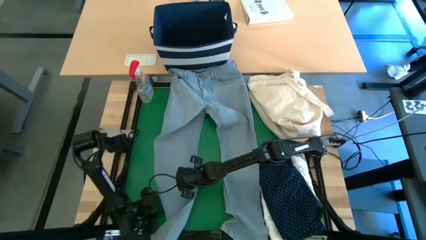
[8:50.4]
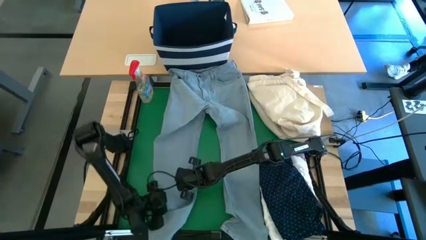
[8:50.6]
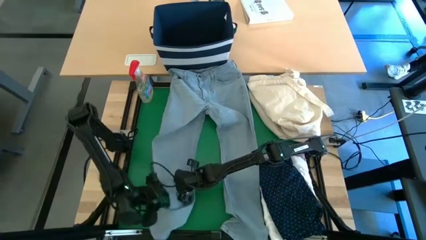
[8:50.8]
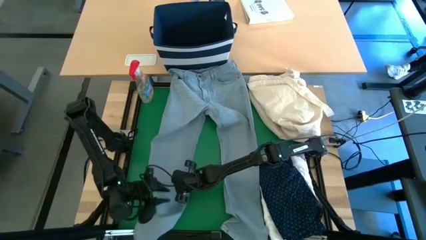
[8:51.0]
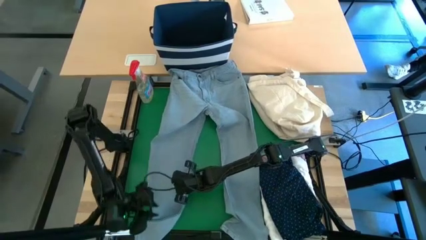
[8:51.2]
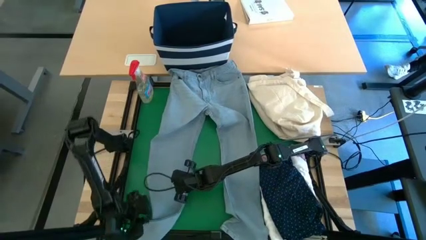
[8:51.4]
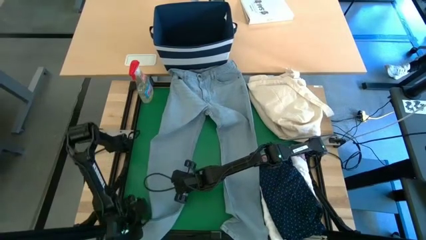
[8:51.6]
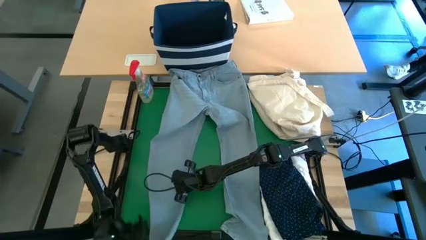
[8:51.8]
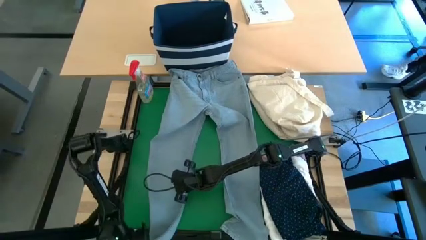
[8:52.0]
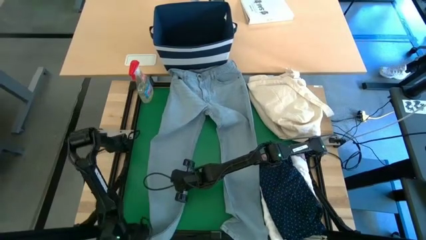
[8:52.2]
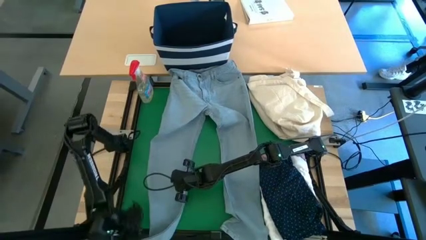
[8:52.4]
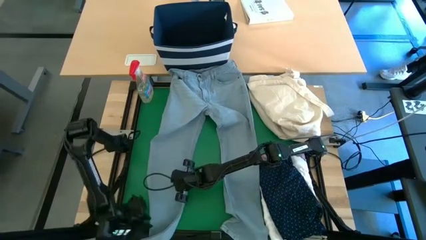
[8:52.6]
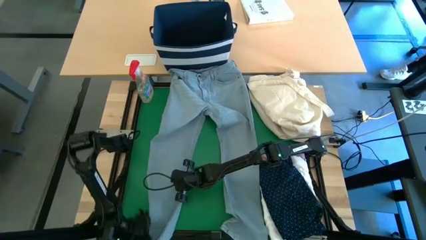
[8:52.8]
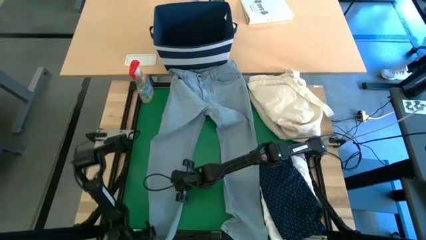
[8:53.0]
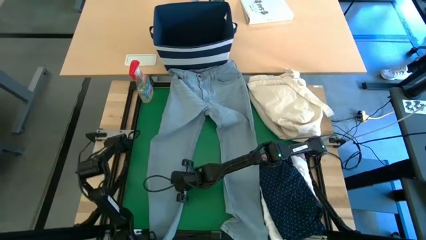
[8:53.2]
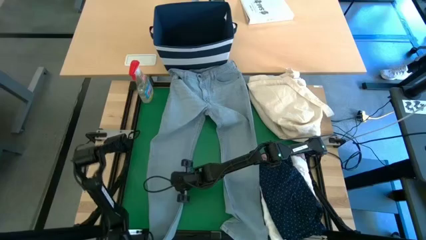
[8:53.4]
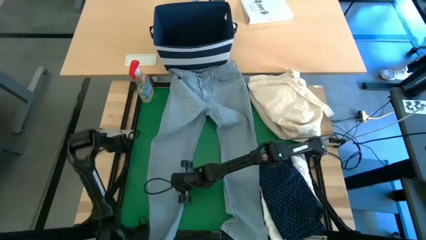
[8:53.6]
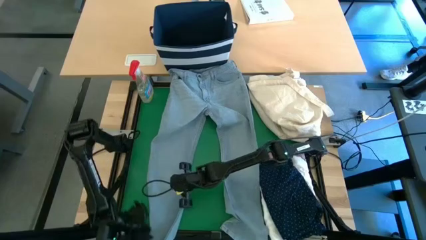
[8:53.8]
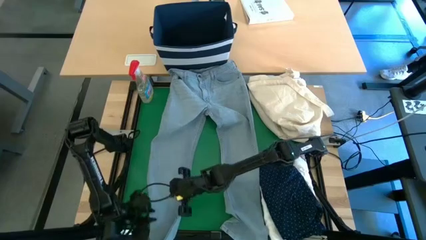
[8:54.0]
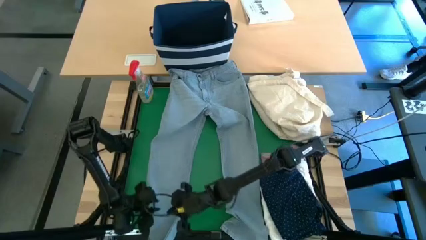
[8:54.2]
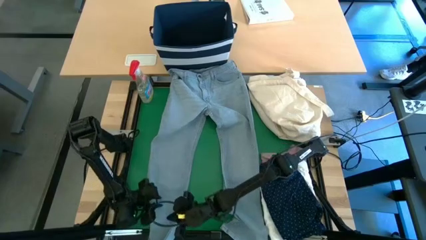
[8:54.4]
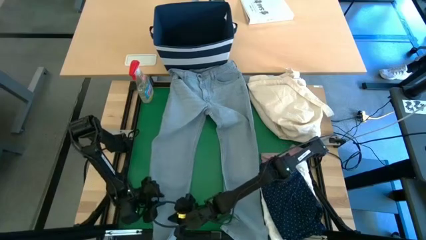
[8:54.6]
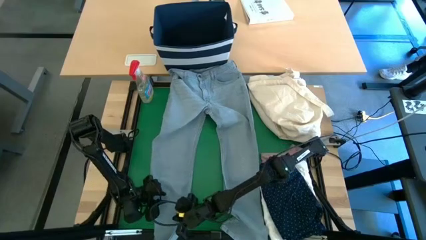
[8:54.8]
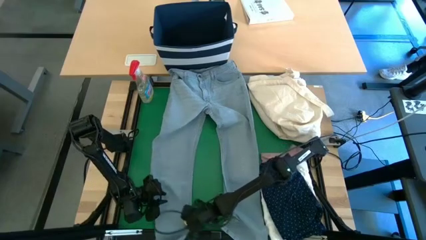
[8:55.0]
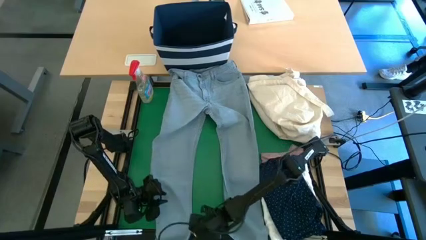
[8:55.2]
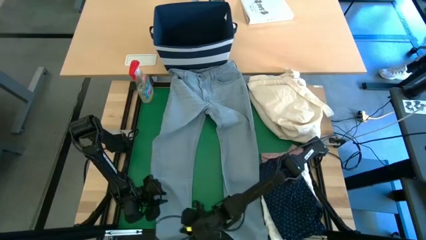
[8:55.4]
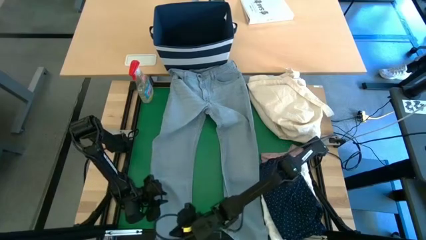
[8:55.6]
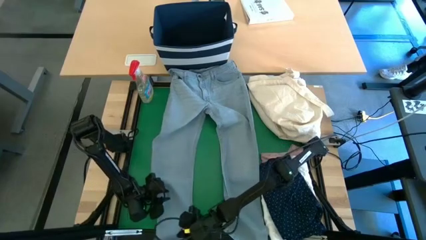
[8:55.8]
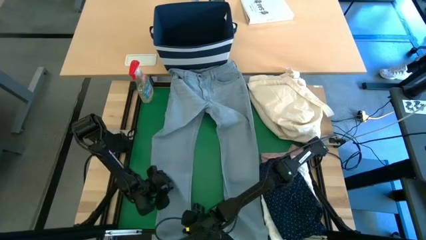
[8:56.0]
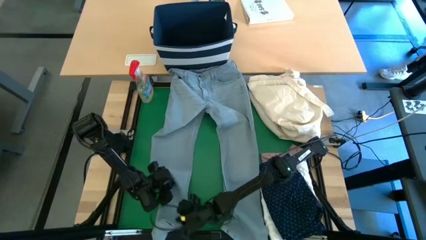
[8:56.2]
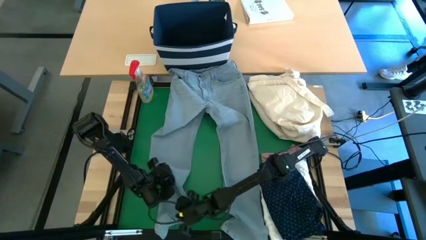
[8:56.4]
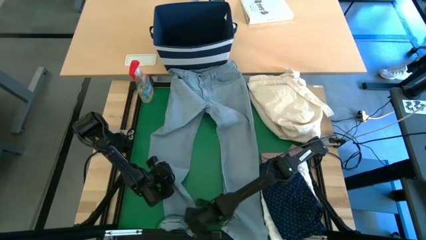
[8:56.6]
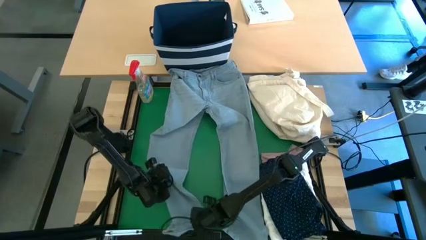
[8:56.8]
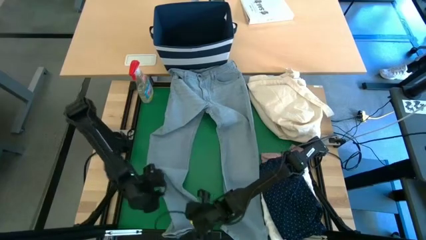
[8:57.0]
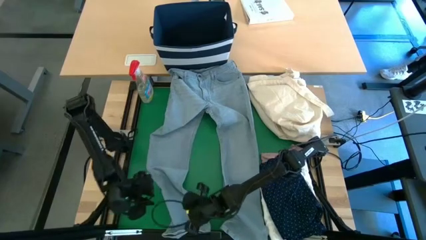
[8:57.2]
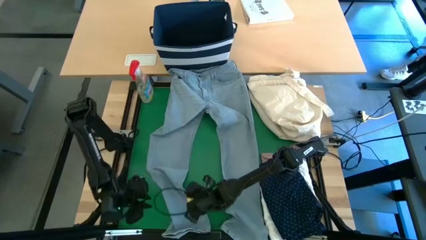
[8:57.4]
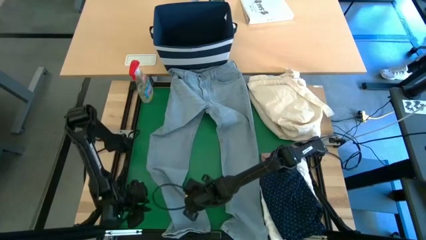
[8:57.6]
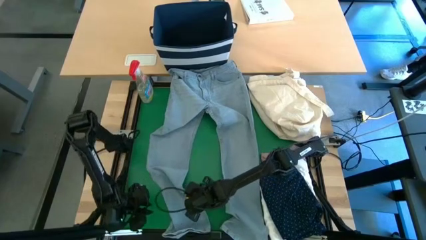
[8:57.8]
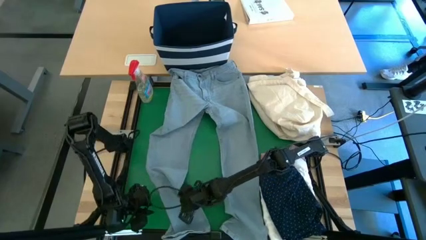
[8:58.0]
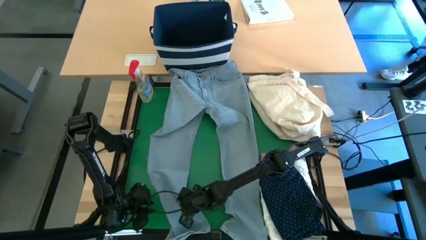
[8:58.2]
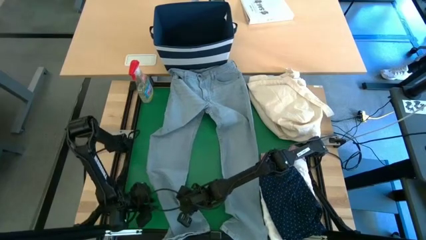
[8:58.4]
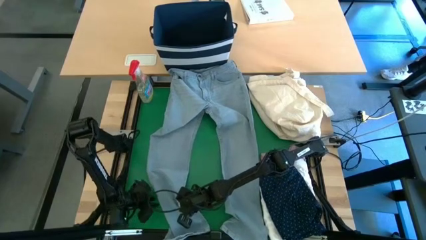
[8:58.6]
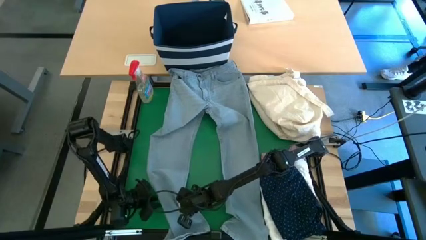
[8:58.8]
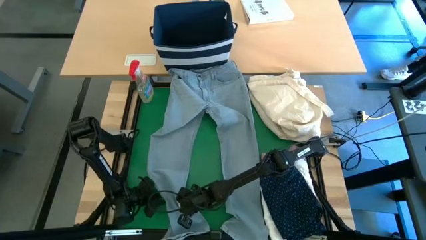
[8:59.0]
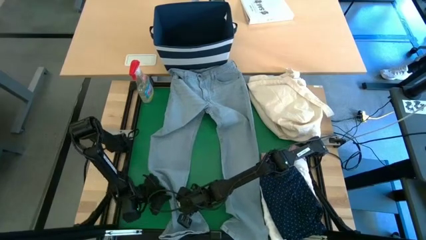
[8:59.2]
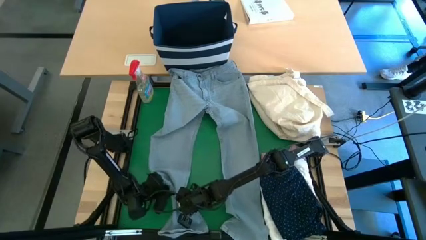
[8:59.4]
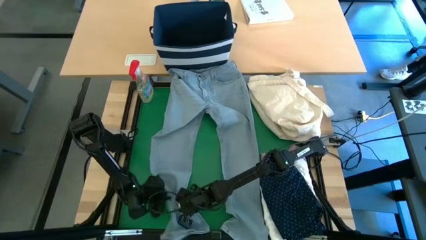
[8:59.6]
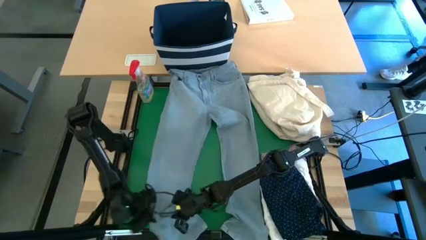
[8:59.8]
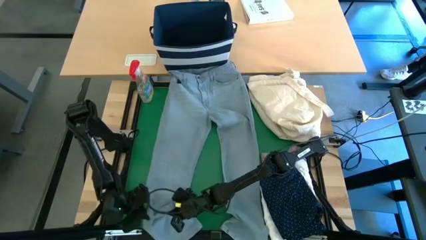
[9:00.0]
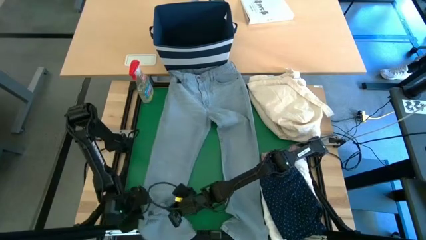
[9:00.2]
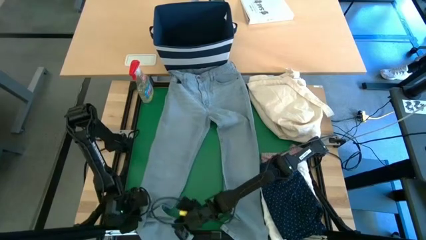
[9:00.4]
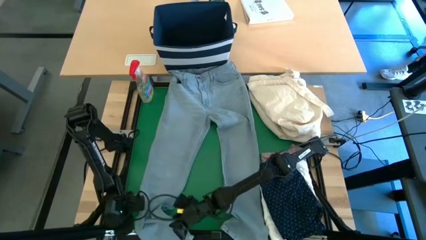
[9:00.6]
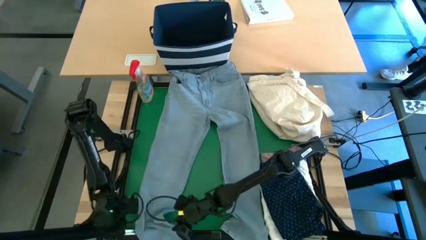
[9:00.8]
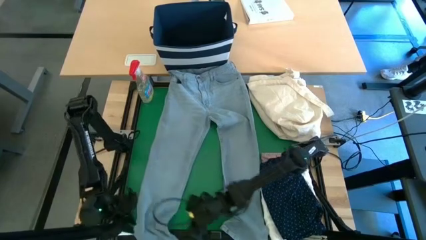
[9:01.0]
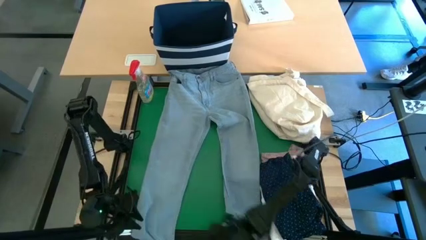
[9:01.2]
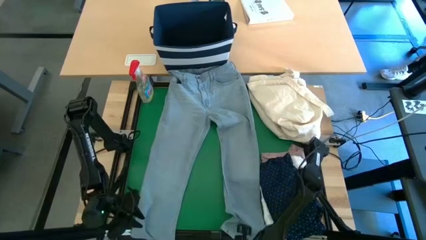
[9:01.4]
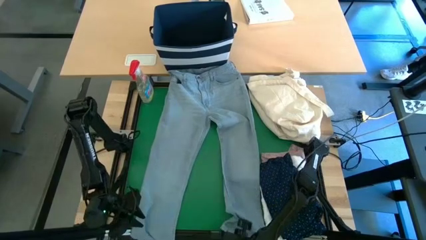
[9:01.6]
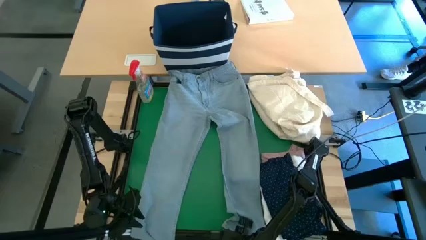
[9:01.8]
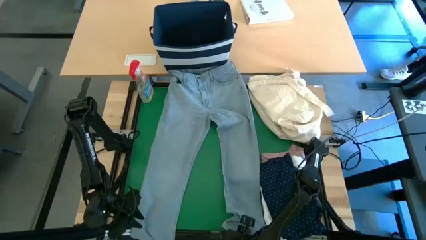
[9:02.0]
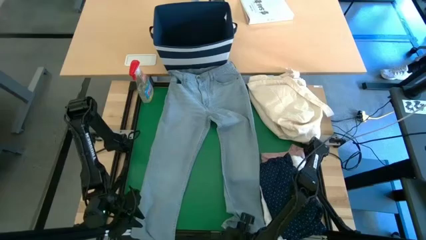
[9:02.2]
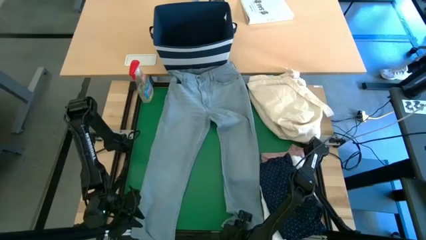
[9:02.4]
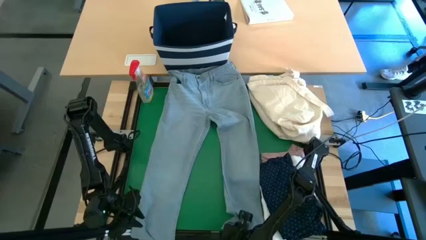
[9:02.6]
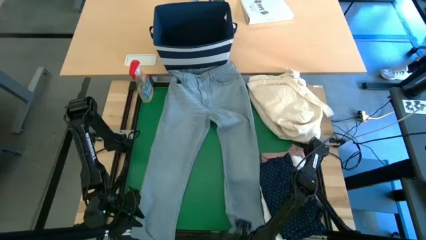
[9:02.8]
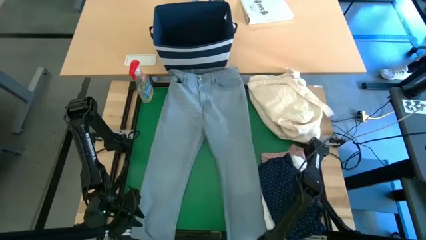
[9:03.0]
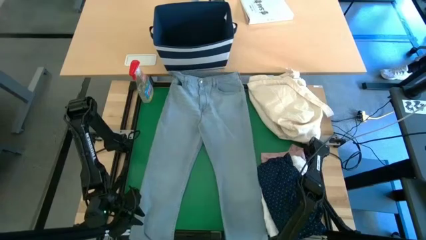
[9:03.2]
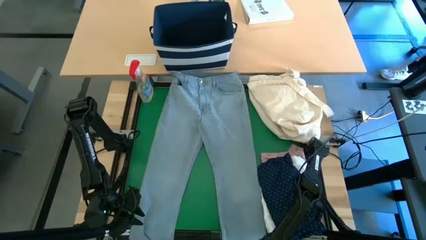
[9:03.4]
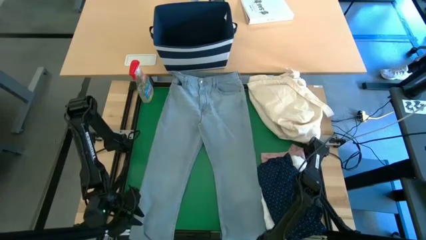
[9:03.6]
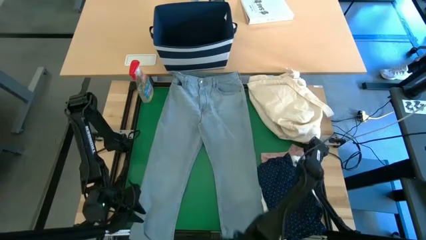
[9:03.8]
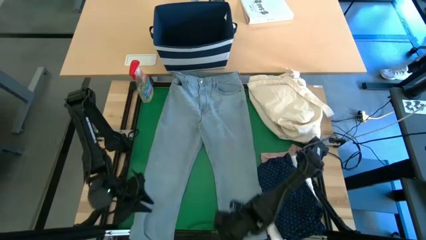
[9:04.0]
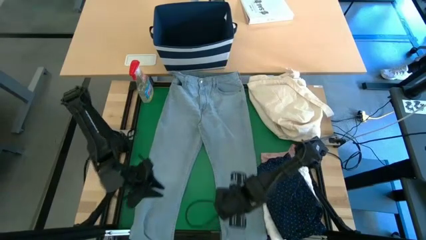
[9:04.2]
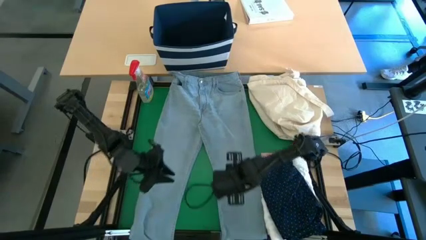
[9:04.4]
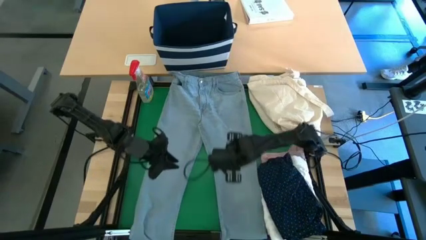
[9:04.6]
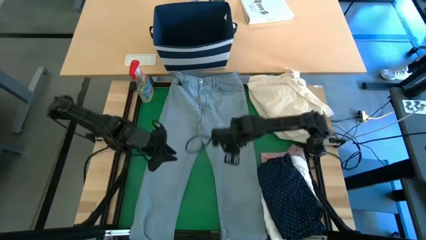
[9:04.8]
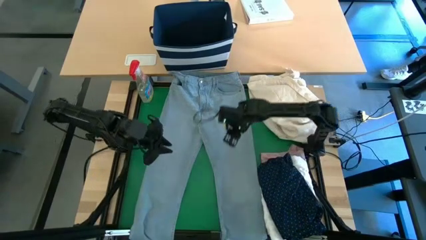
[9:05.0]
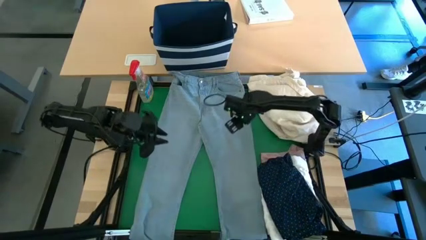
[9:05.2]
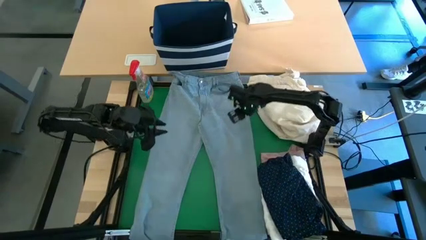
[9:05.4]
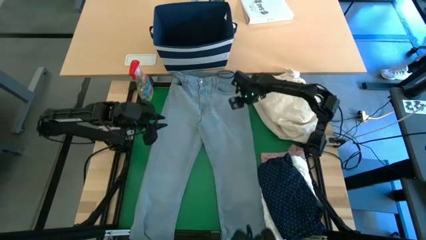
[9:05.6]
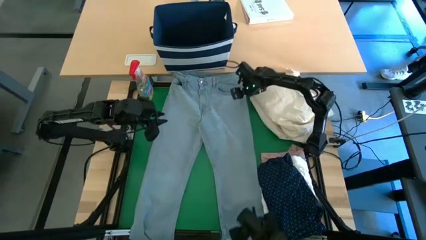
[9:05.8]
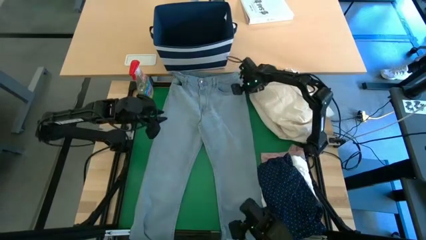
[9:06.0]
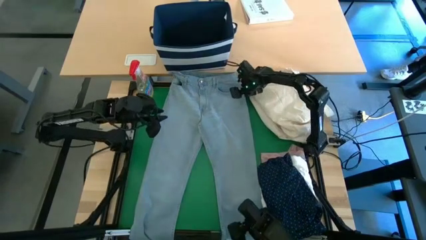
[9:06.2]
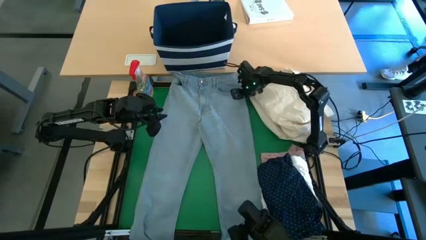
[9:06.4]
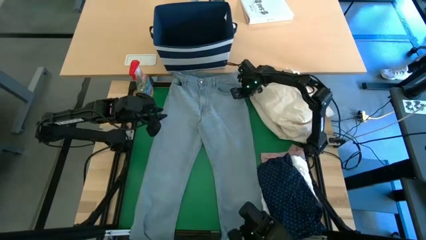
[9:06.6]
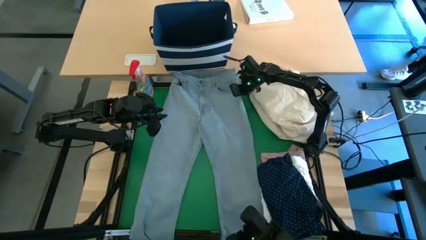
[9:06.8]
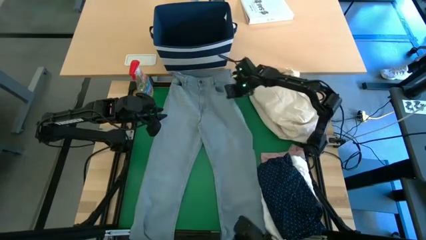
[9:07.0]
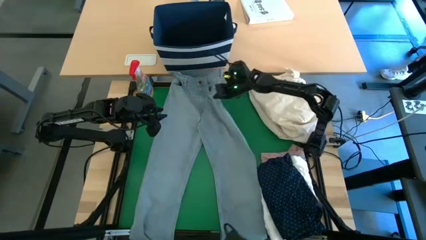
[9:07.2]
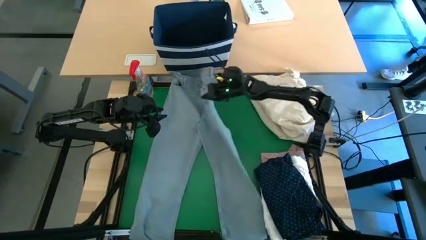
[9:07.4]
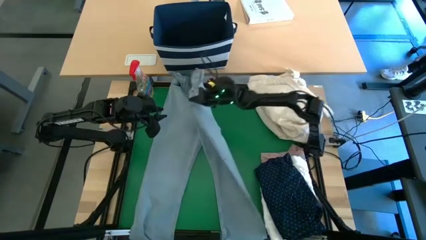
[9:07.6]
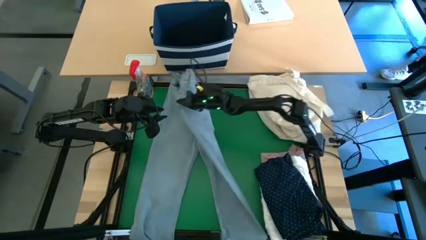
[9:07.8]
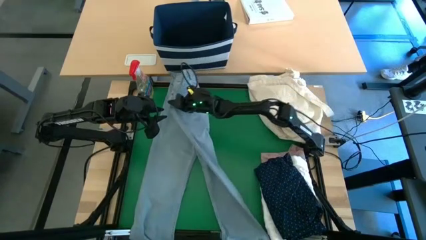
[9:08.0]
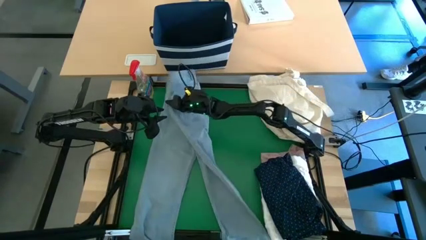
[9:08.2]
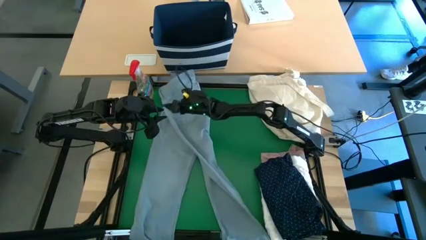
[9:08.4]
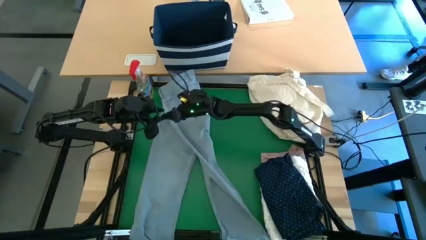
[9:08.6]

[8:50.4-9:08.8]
Task: Fold laundry
Fold the blue jeans
